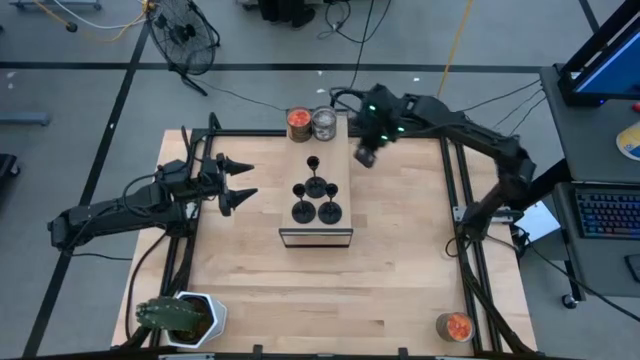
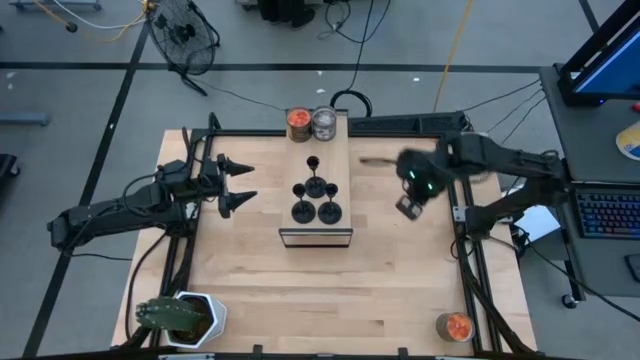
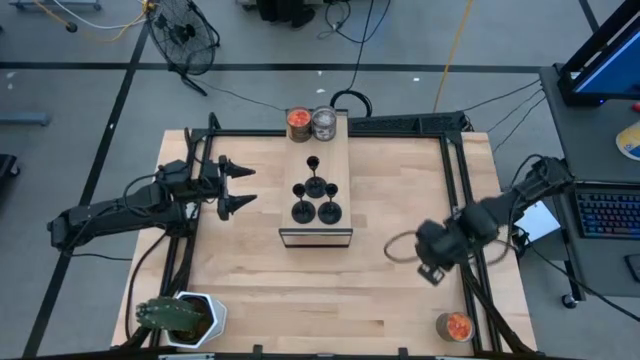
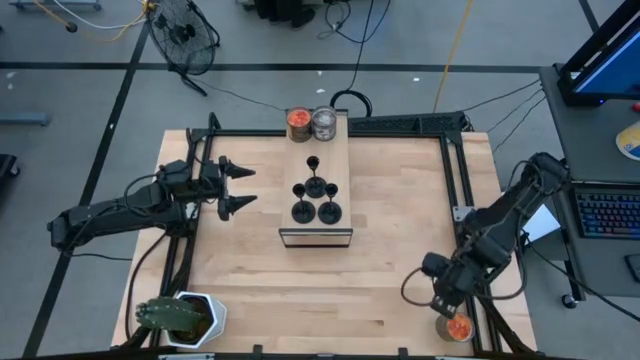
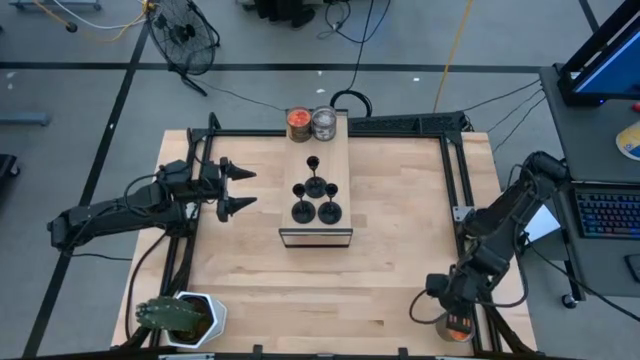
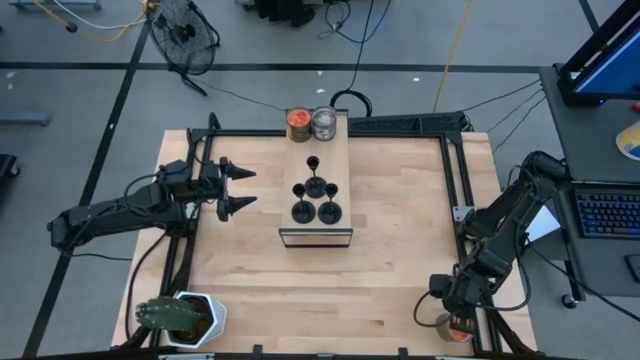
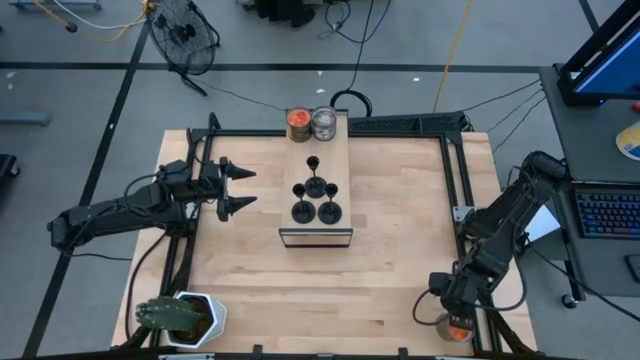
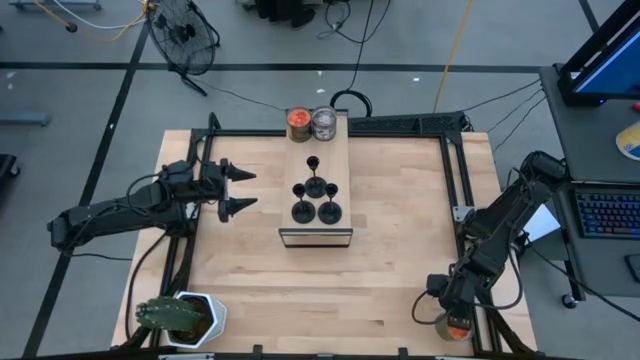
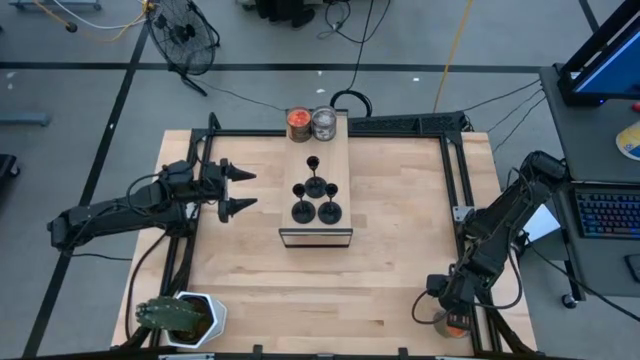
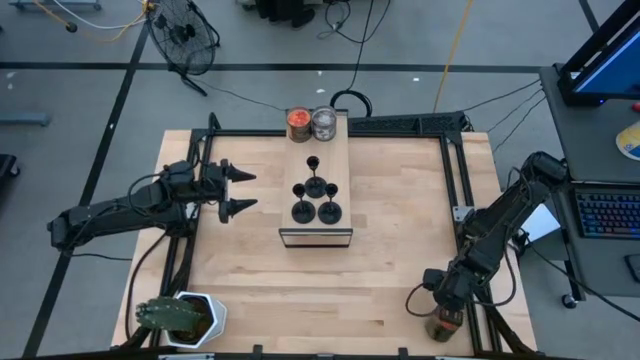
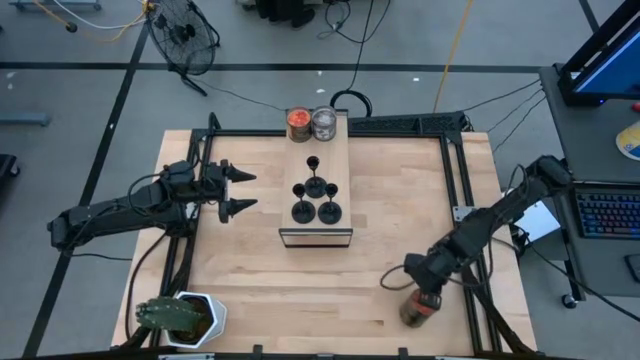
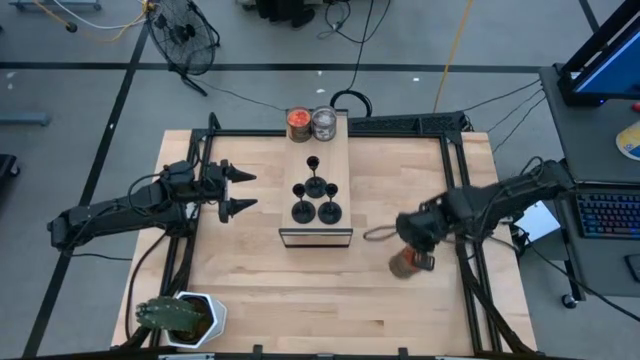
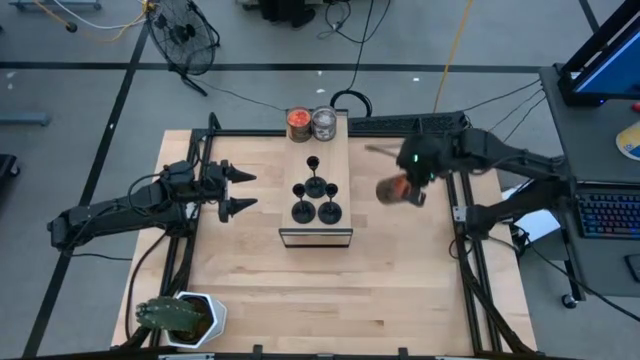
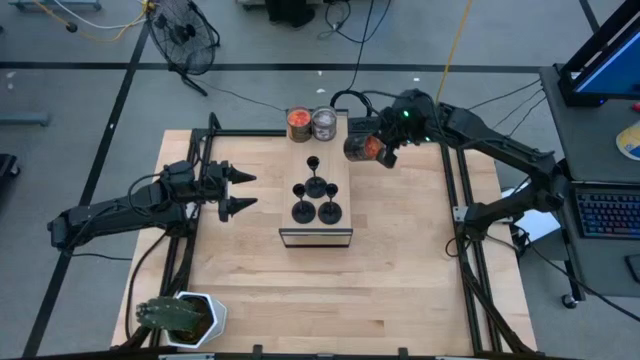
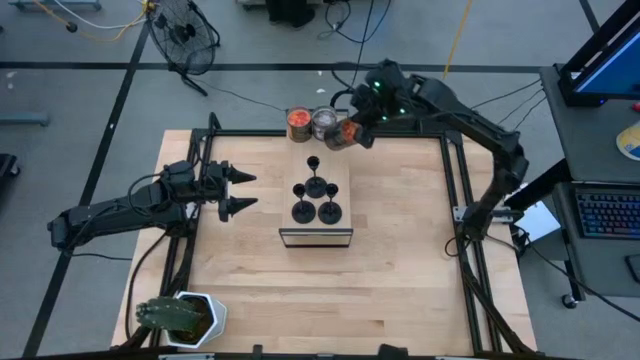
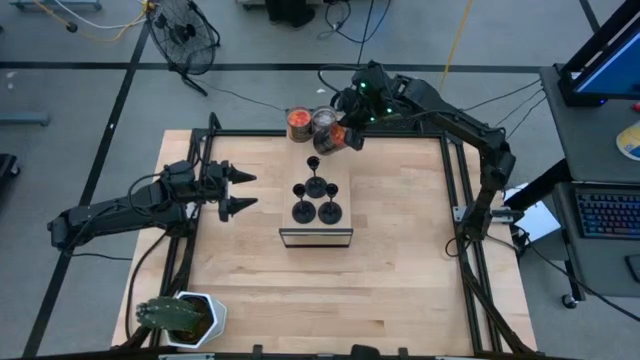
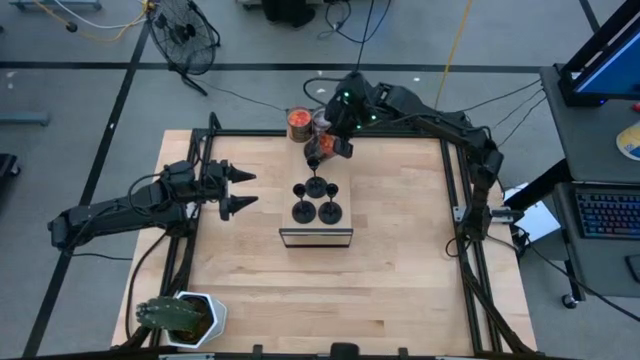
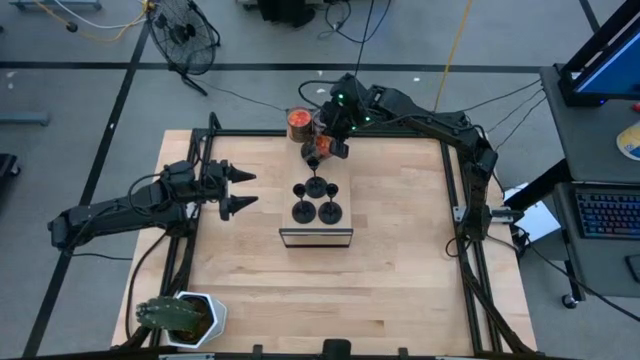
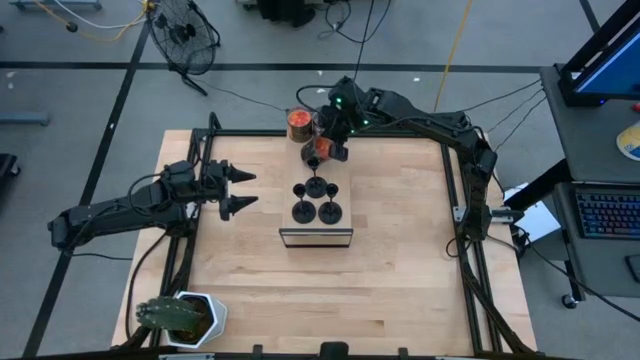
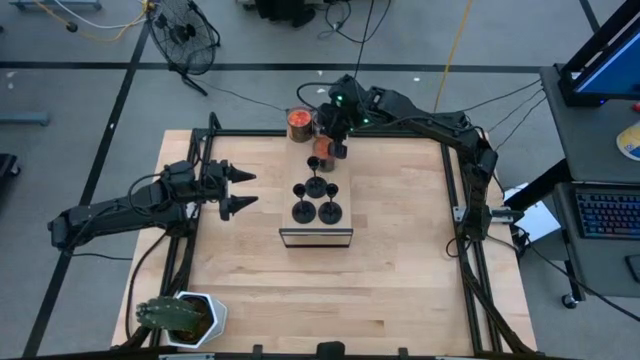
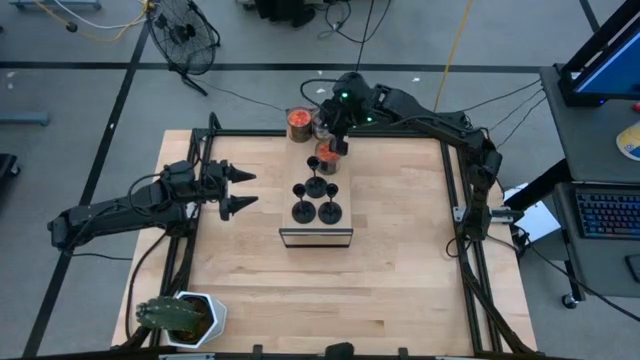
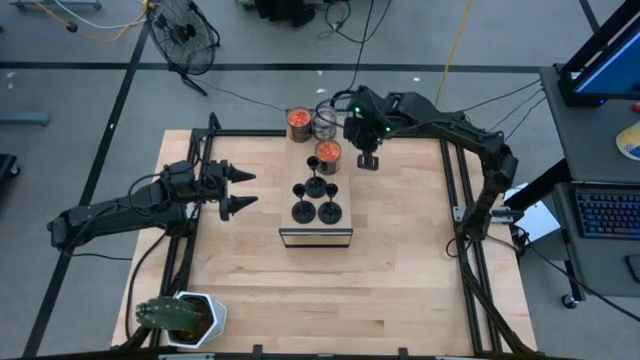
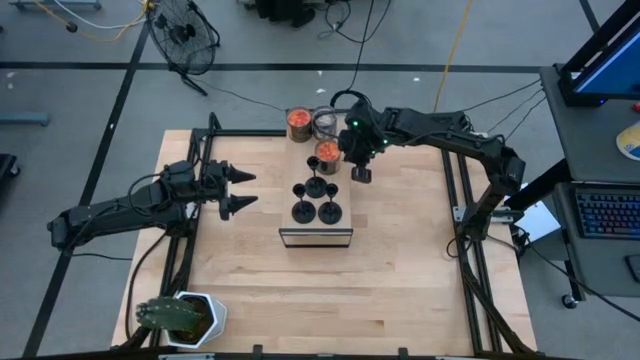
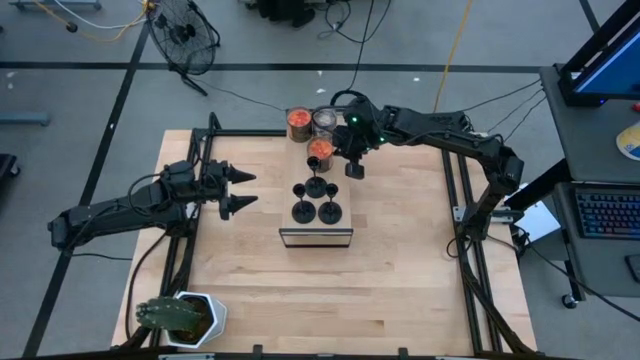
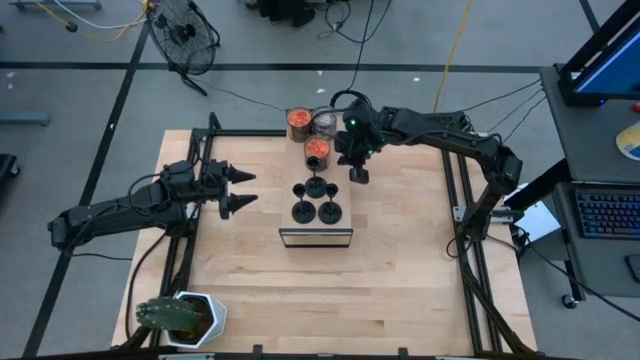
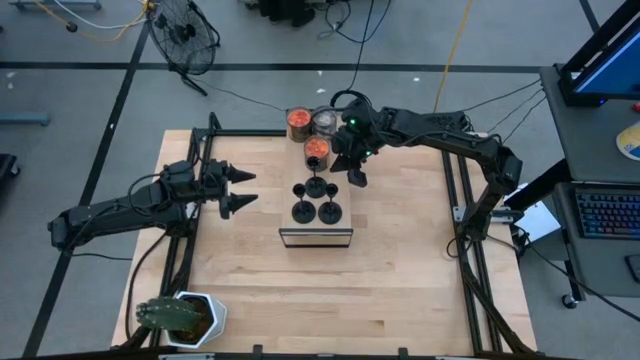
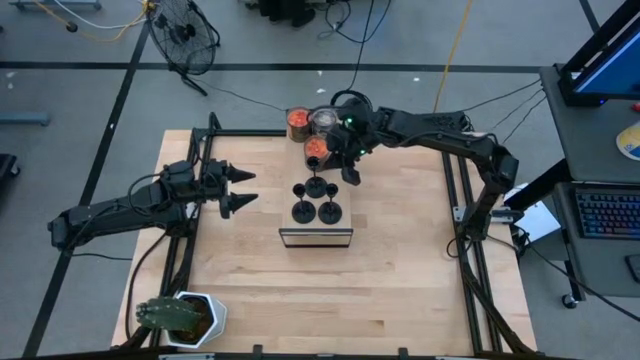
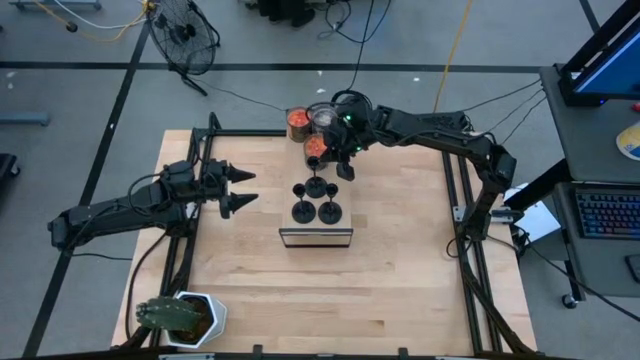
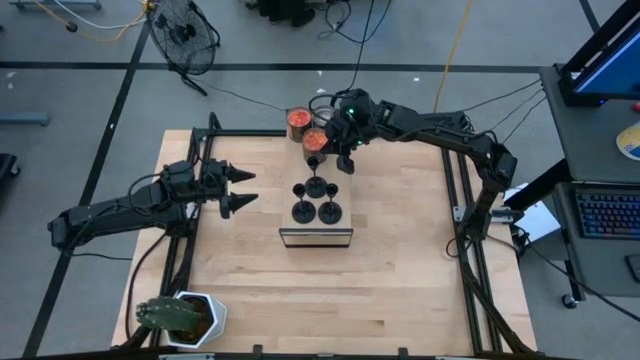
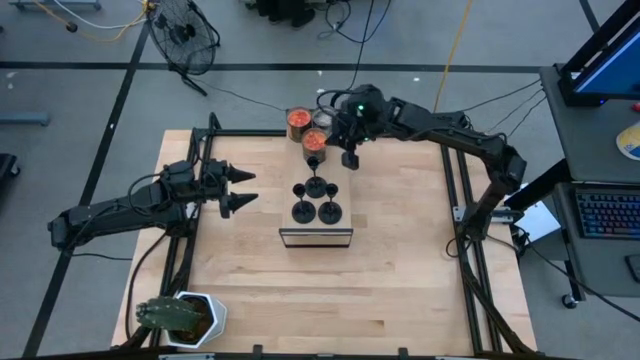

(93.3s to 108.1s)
Task: Pick & Place candle stick holders
Put the orange scented candle on the shelf

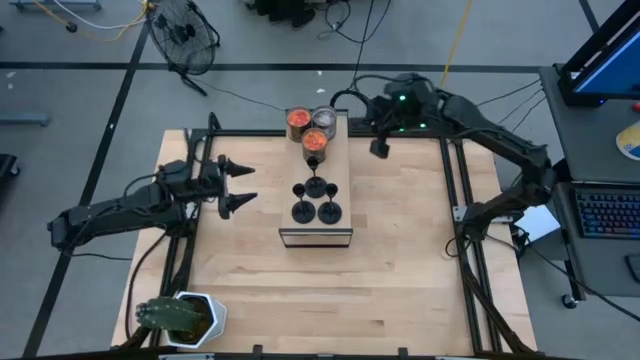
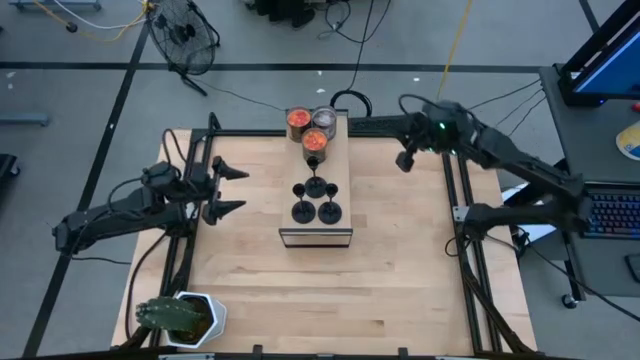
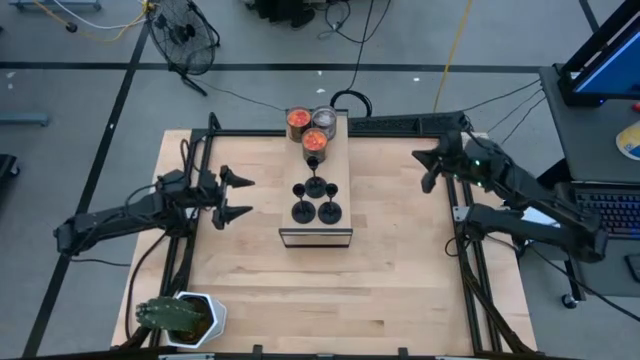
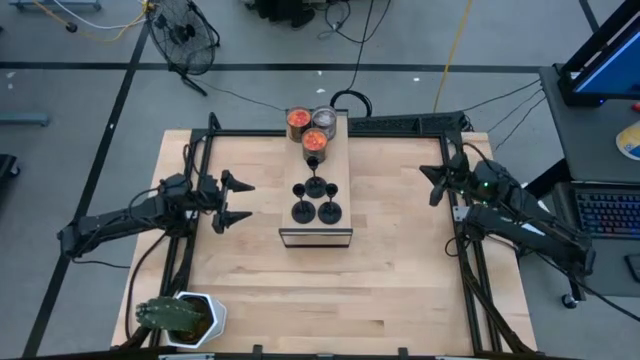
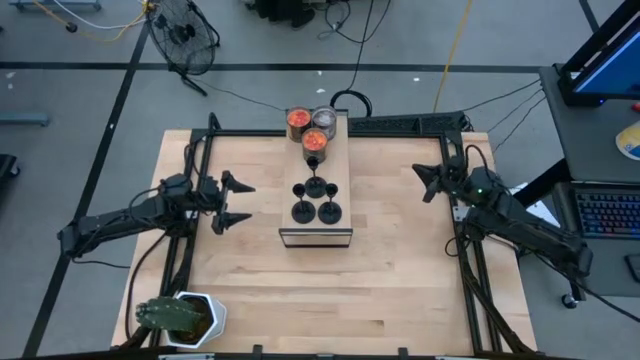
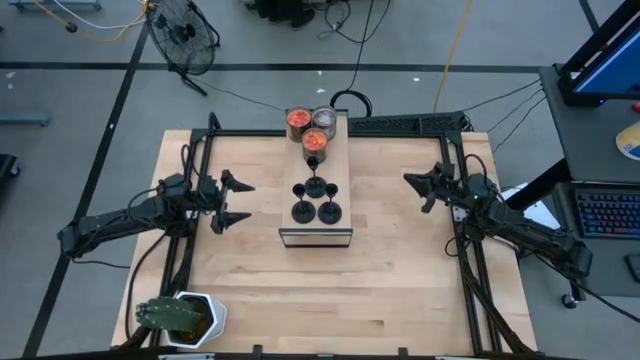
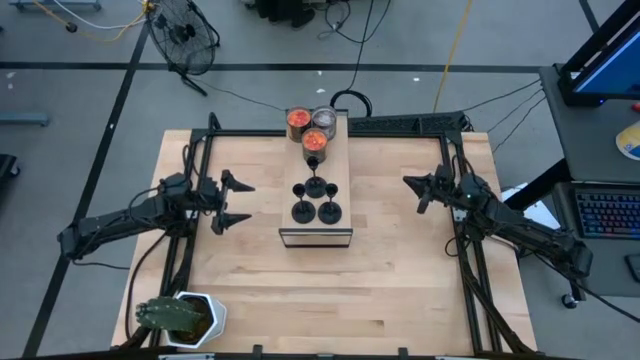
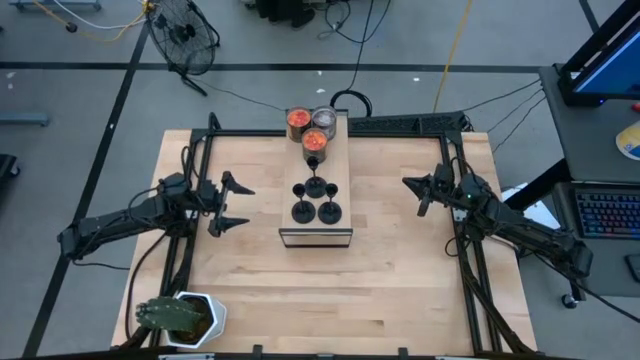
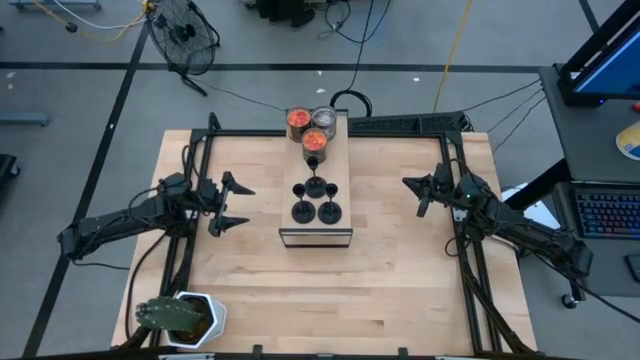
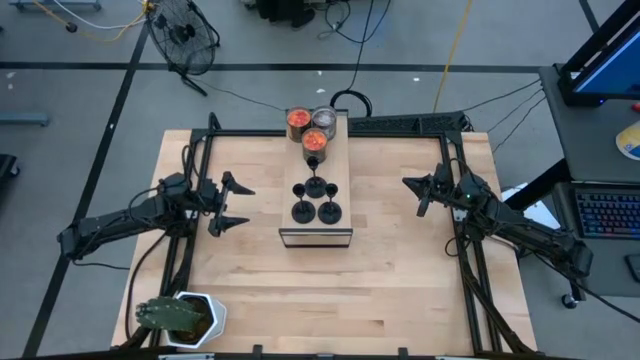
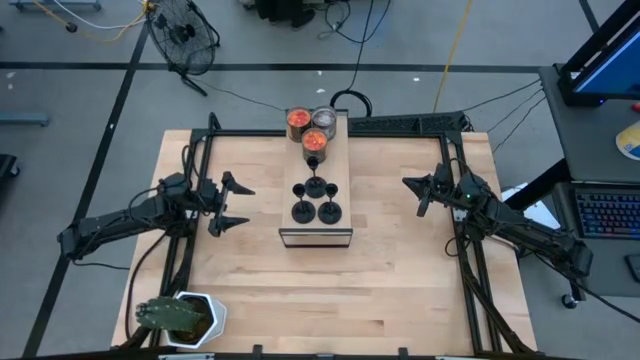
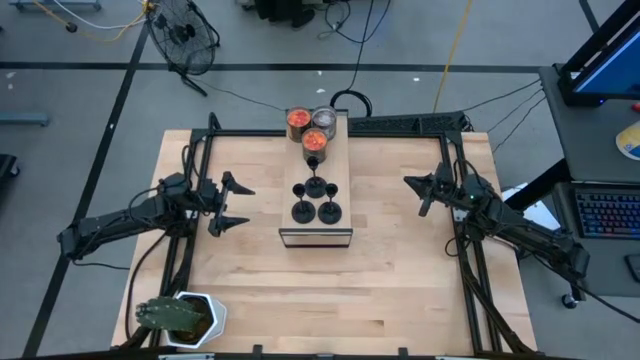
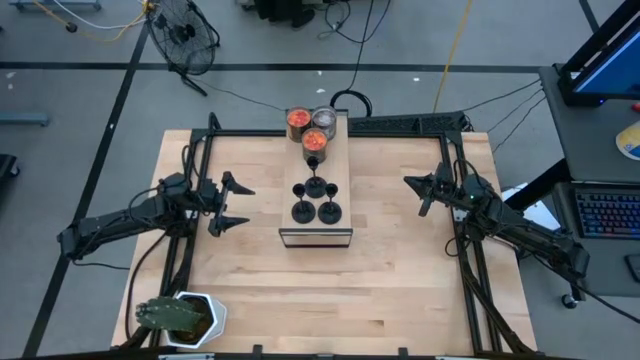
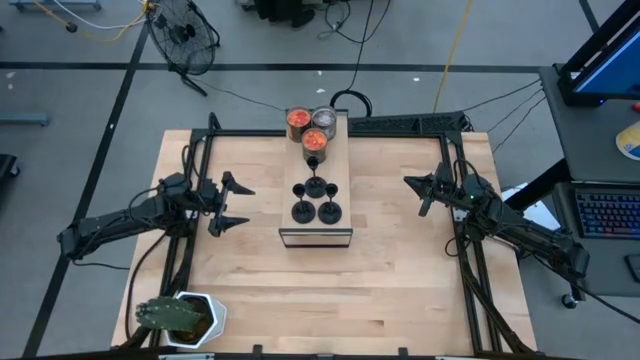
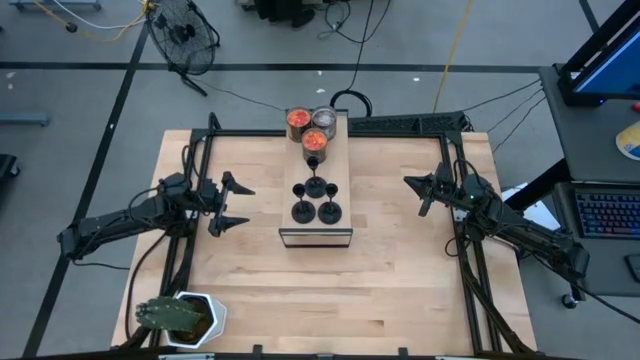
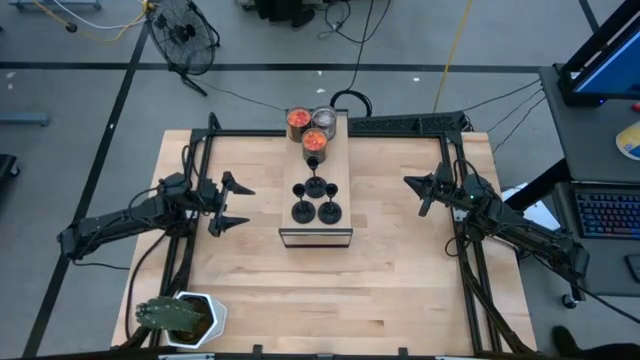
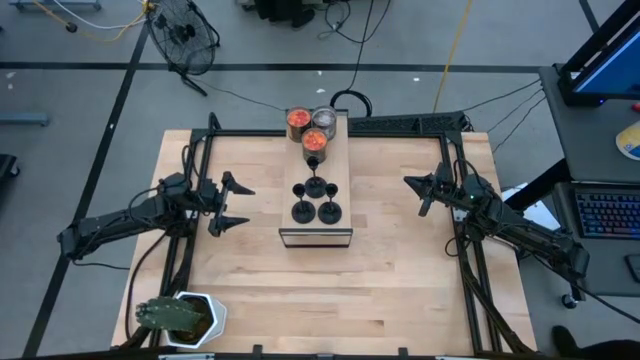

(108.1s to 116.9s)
Return to Home Position
